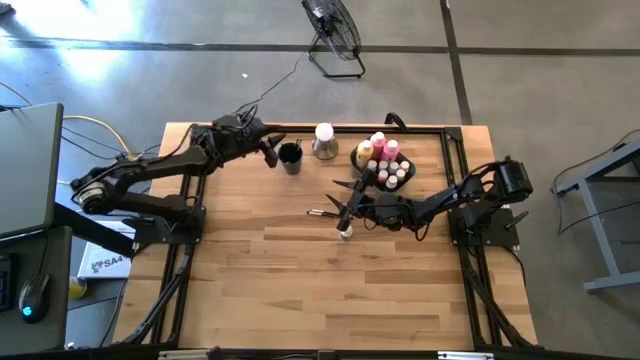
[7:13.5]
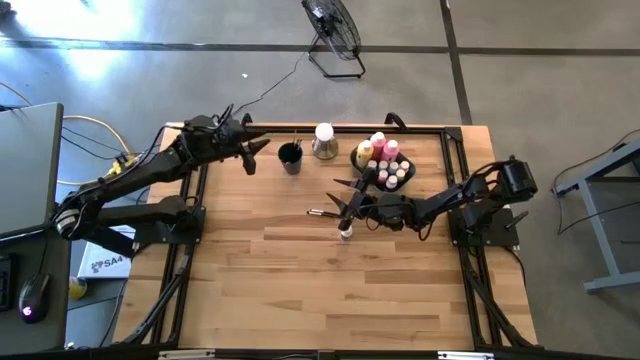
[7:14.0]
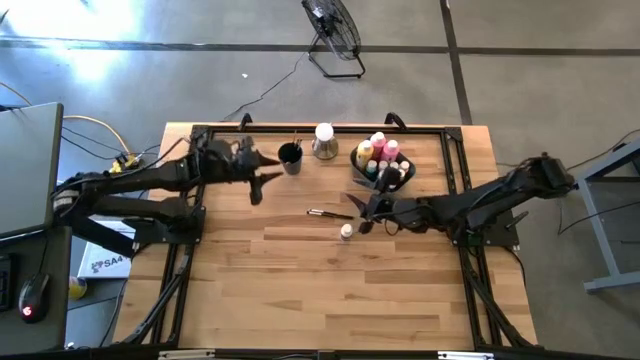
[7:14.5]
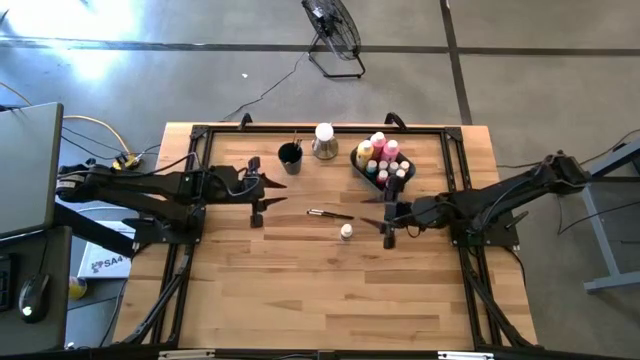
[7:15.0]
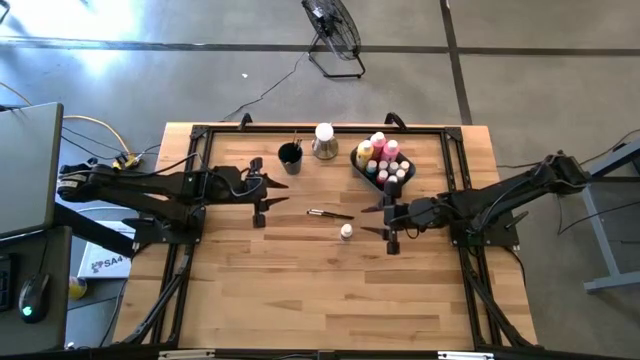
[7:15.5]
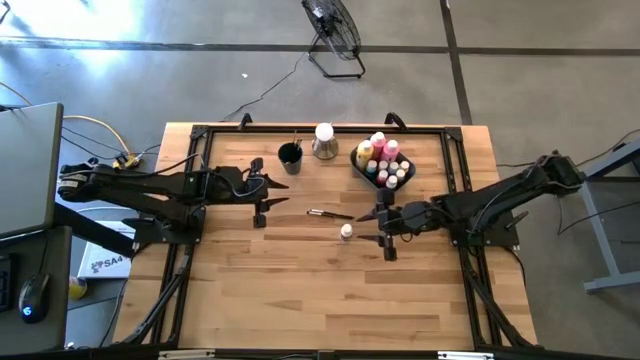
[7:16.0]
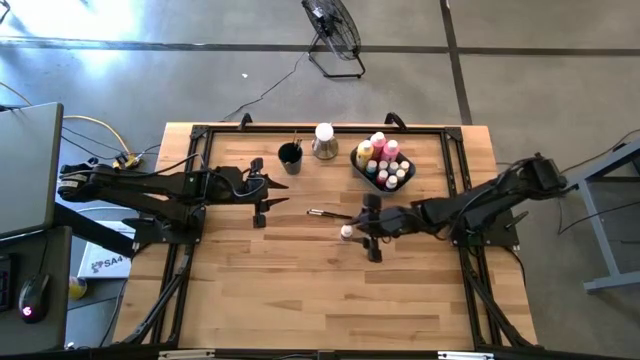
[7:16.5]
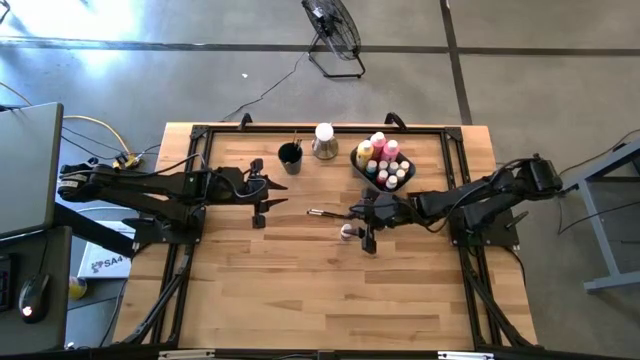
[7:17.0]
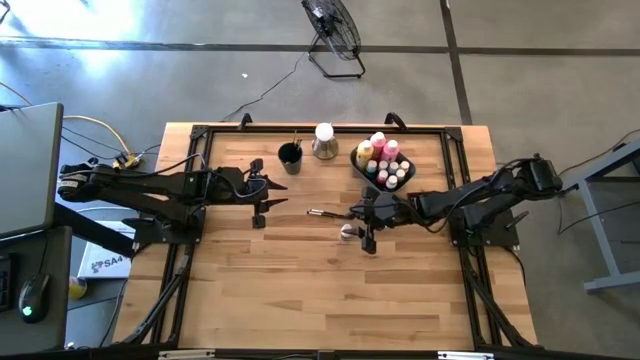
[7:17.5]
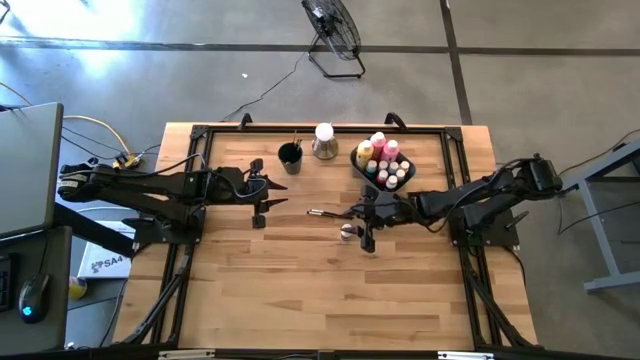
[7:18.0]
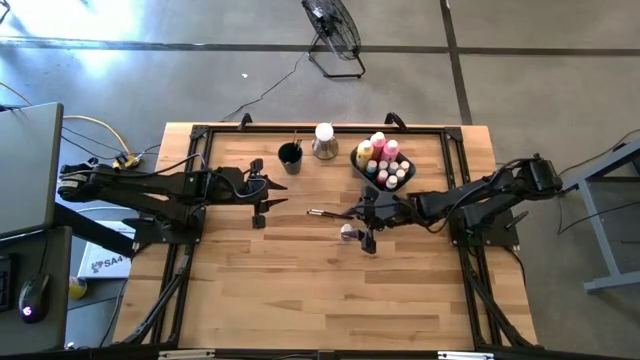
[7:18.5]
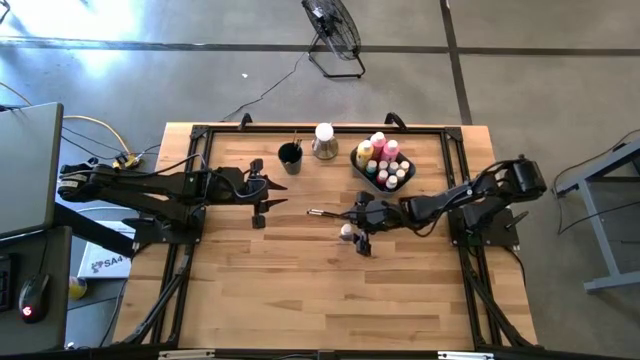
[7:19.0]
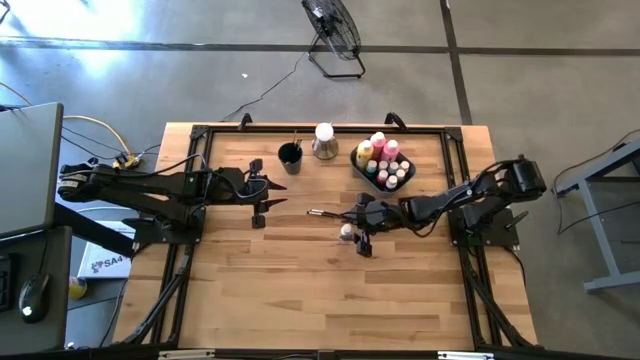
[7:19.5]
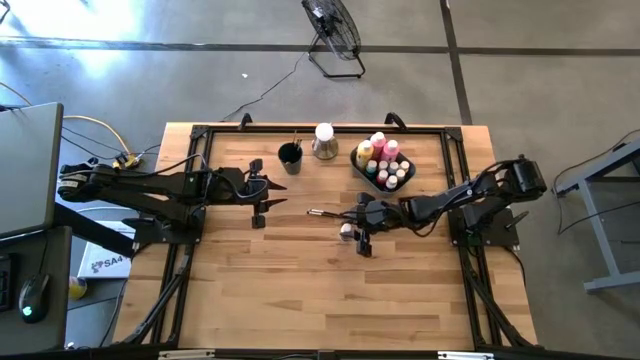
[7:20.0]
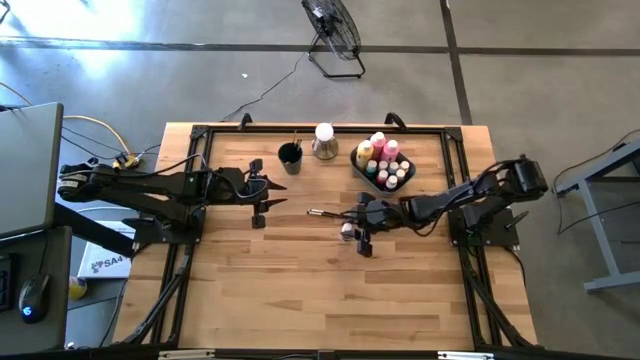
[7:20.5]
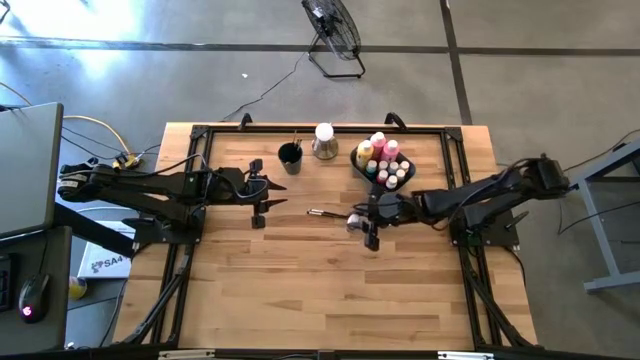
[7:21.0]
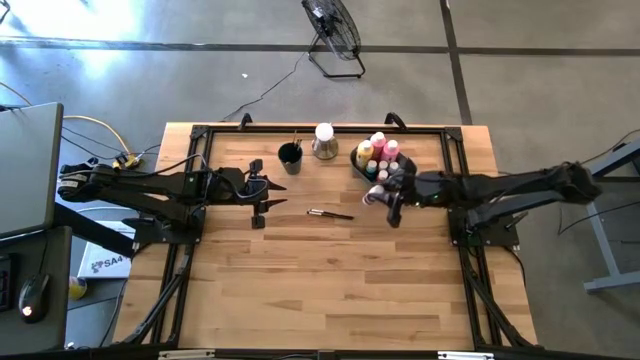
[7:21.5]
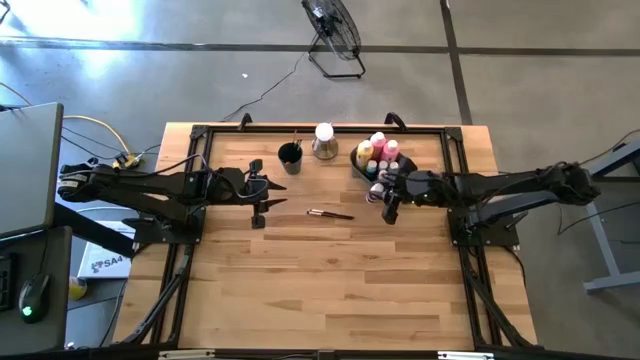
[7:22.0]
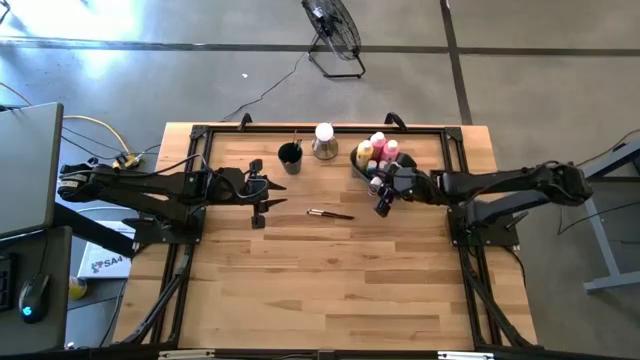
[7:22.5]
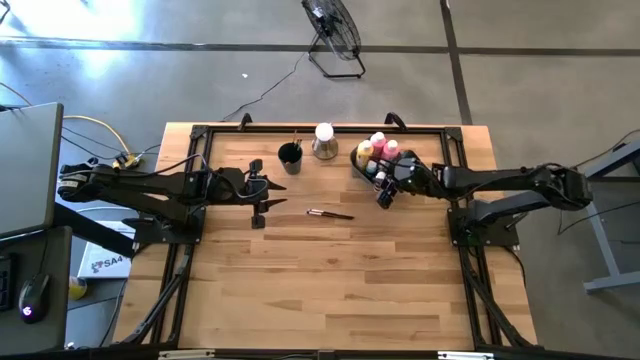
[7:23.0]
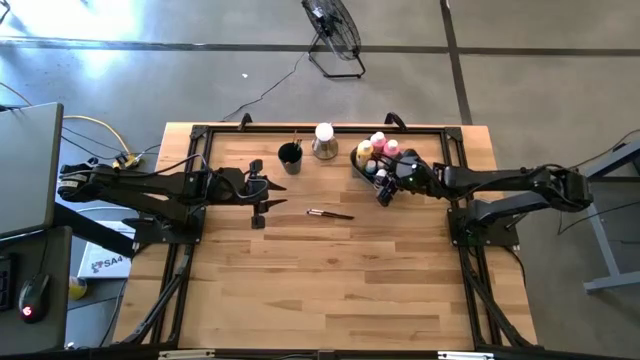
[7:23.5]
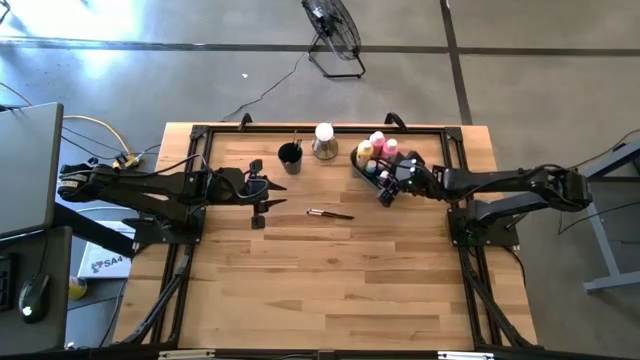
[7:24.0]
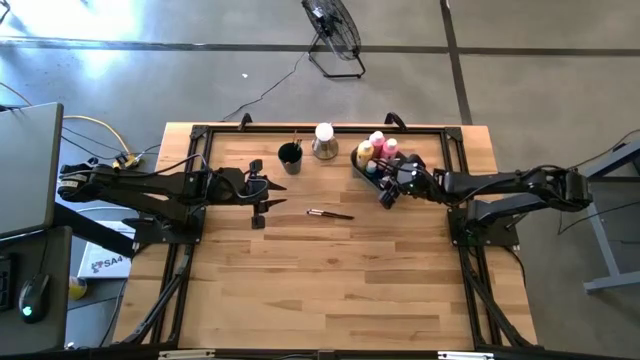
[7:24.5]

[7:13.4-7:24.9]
Task: Pick & Place Paint Supplies
Put the small white paint bottle into the blue bin
